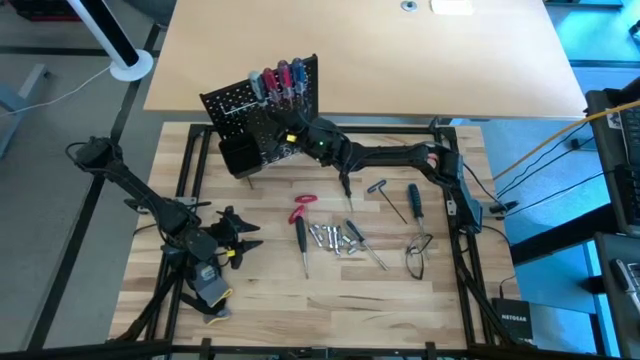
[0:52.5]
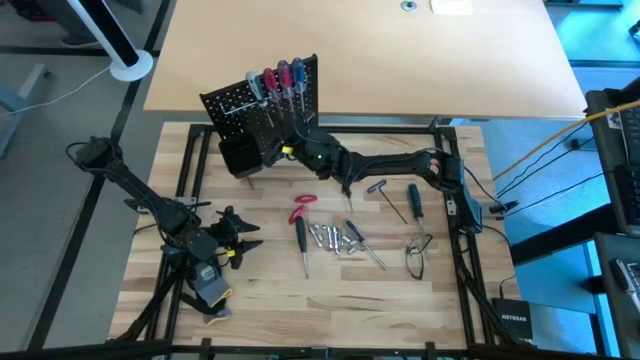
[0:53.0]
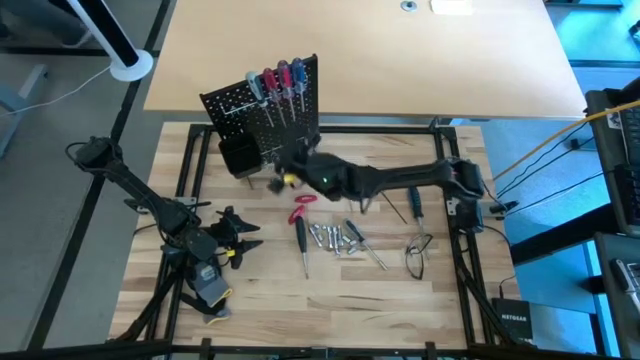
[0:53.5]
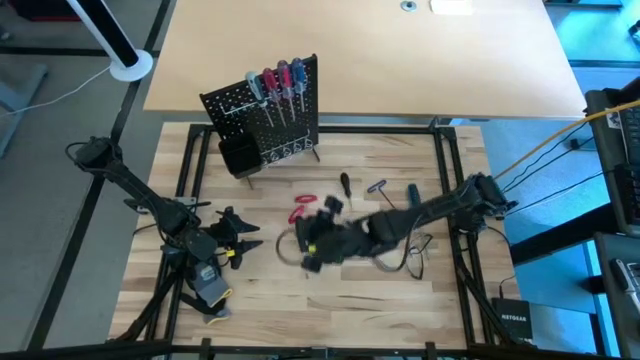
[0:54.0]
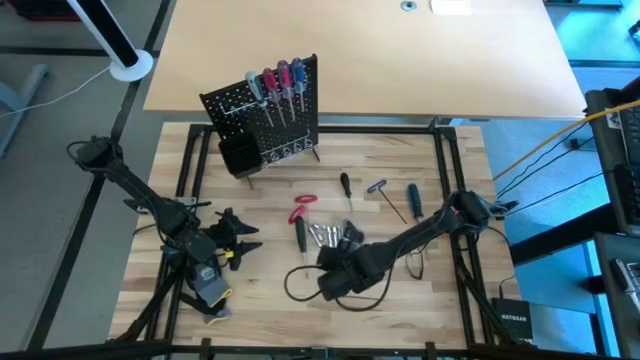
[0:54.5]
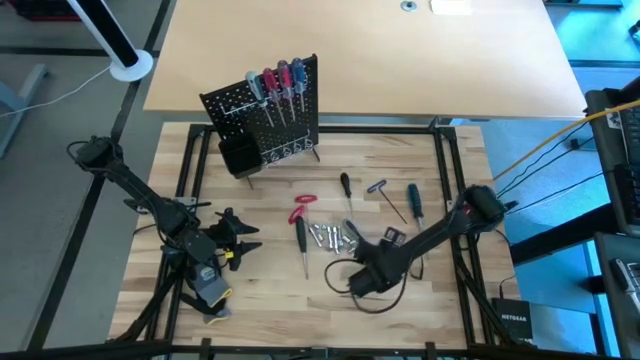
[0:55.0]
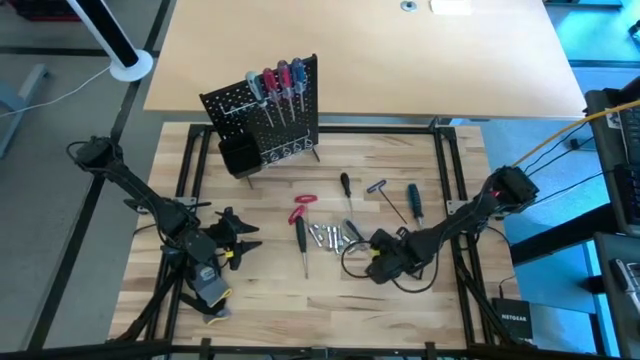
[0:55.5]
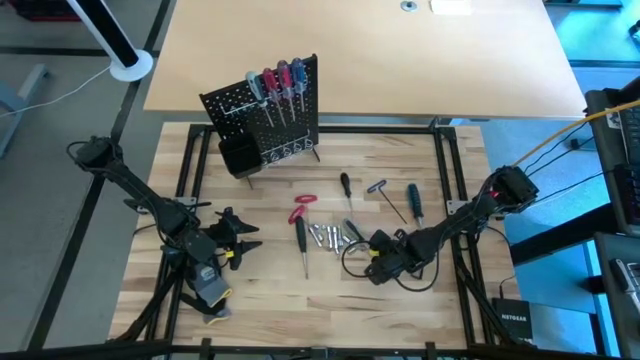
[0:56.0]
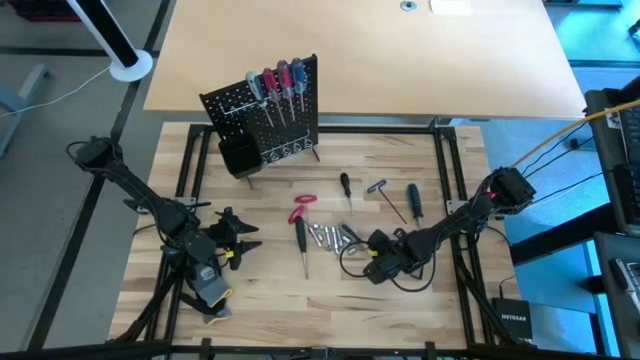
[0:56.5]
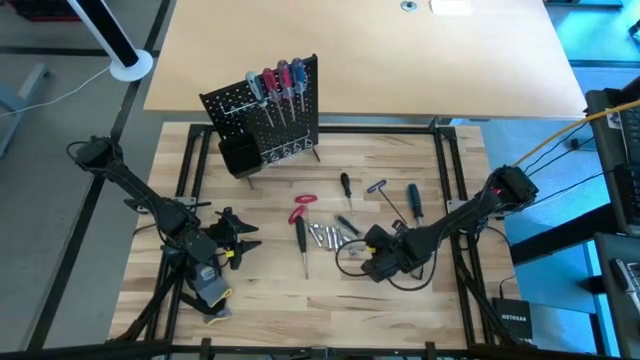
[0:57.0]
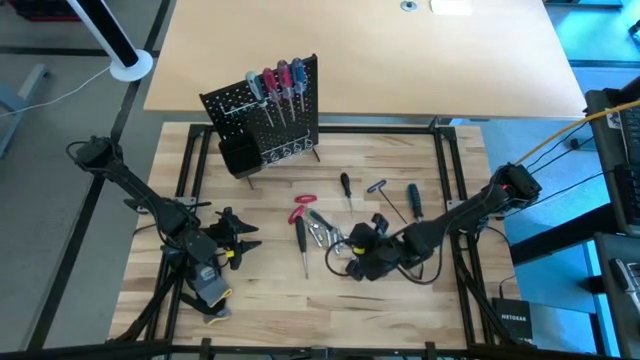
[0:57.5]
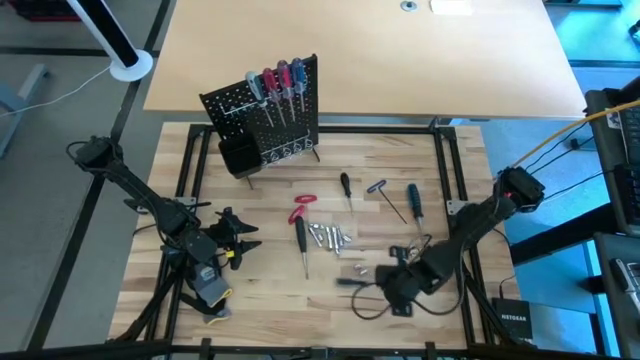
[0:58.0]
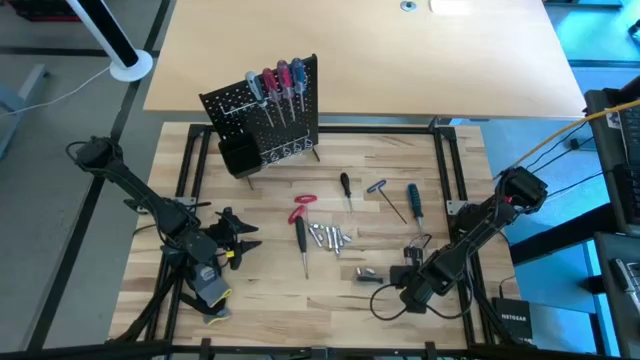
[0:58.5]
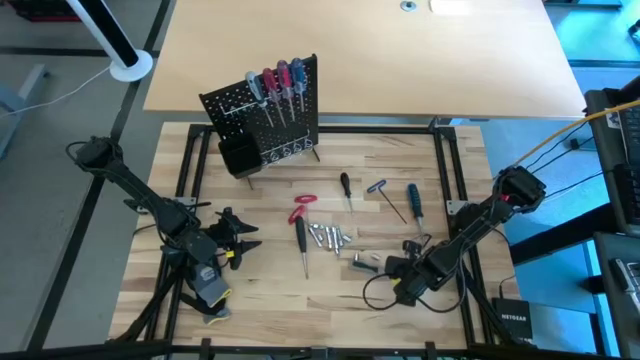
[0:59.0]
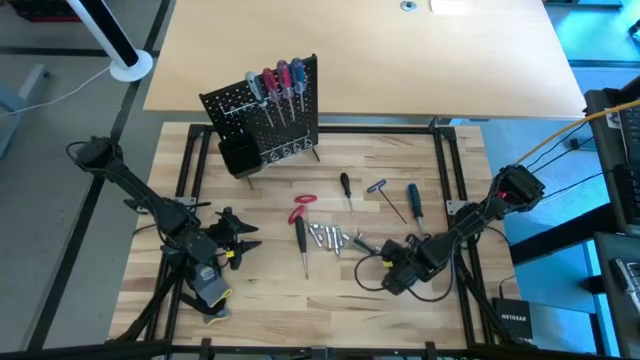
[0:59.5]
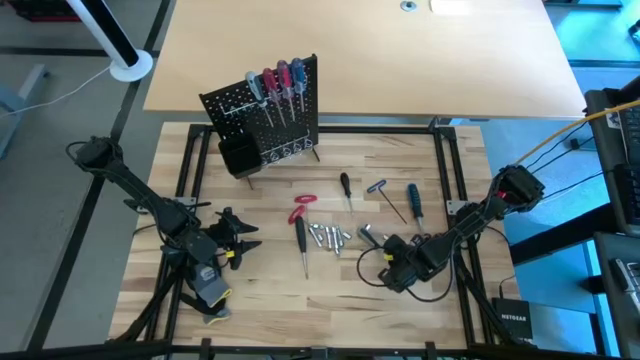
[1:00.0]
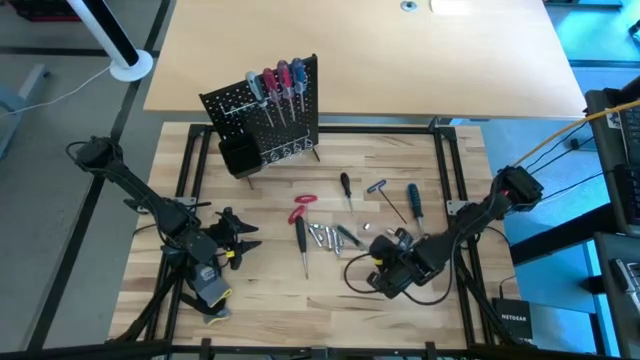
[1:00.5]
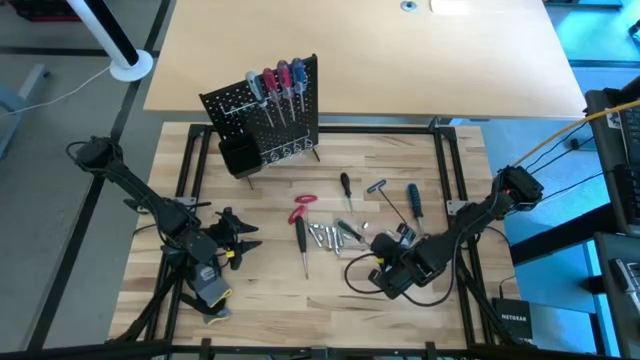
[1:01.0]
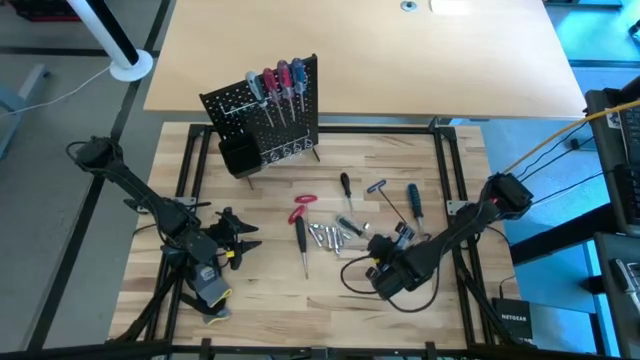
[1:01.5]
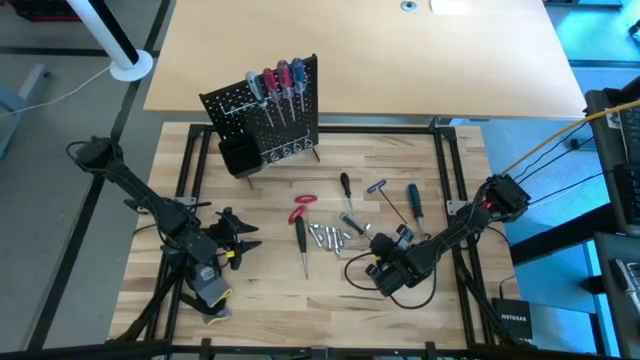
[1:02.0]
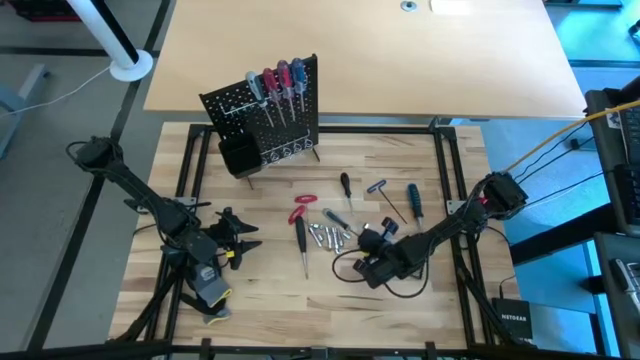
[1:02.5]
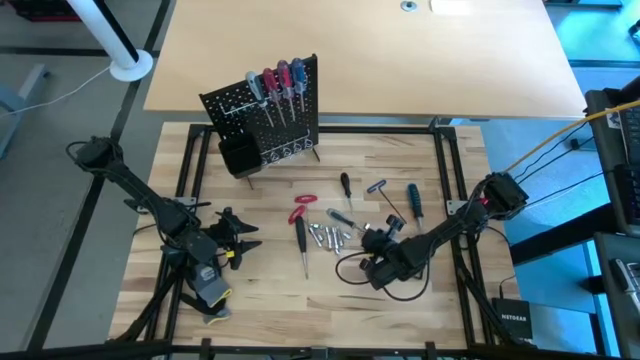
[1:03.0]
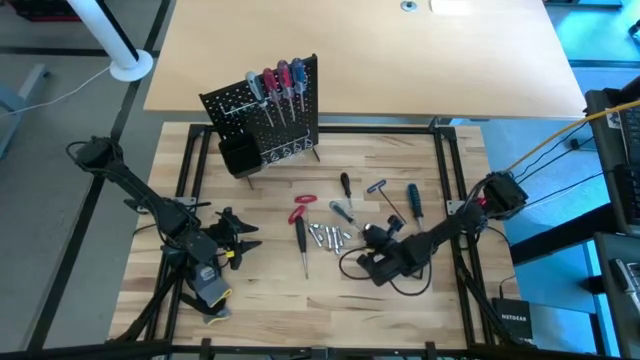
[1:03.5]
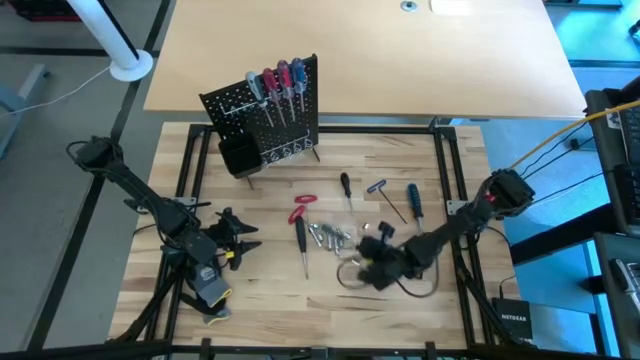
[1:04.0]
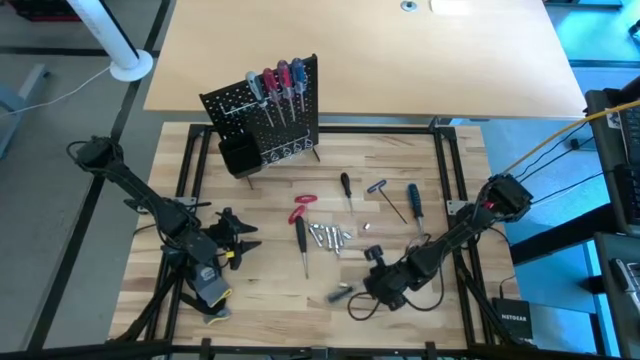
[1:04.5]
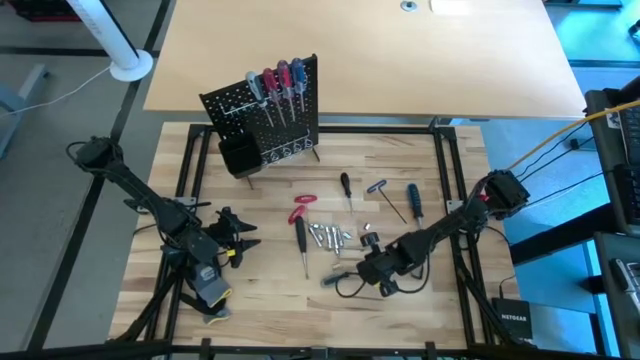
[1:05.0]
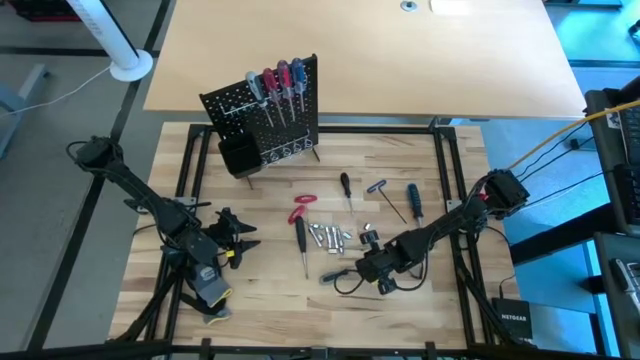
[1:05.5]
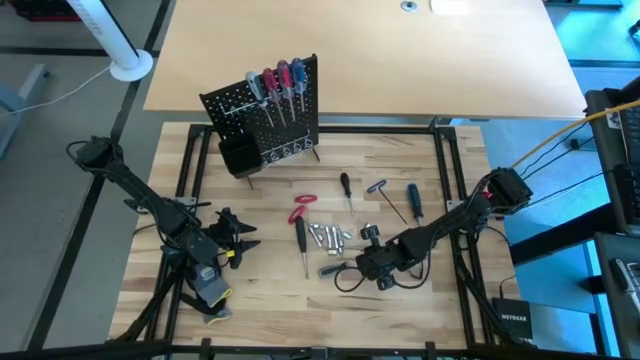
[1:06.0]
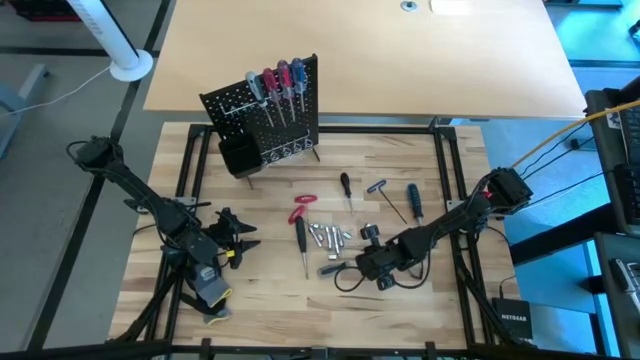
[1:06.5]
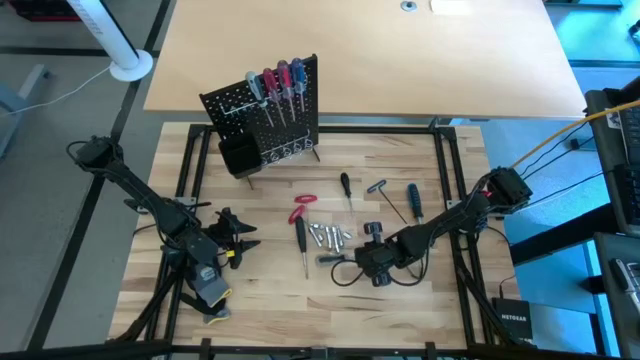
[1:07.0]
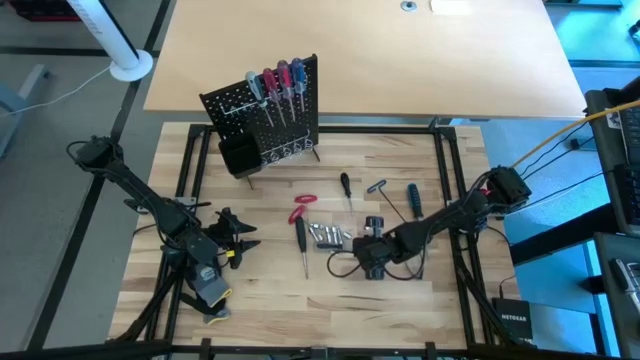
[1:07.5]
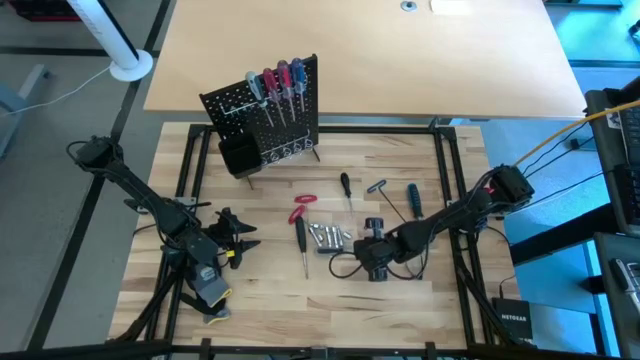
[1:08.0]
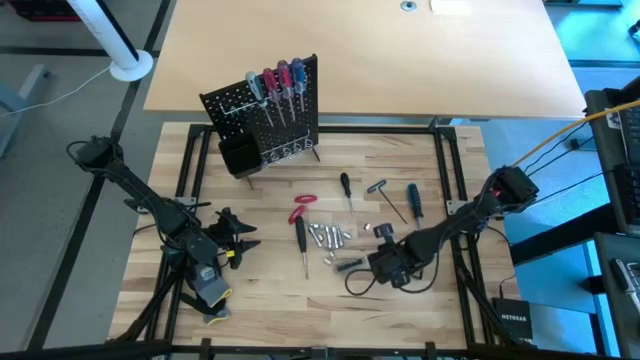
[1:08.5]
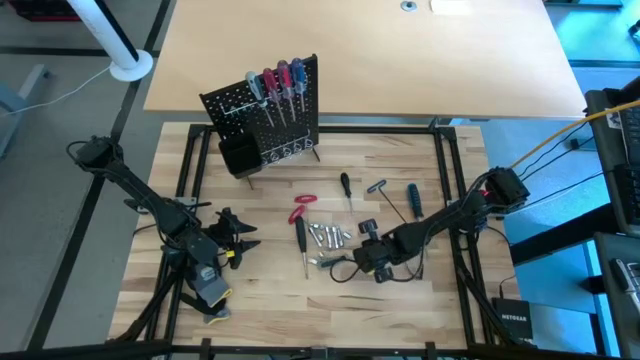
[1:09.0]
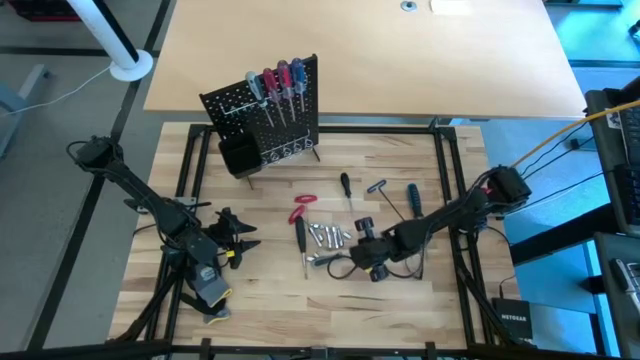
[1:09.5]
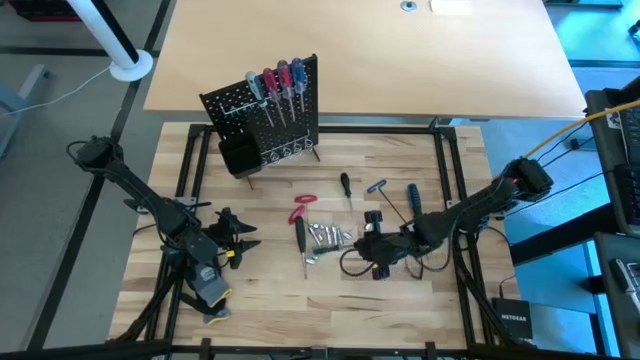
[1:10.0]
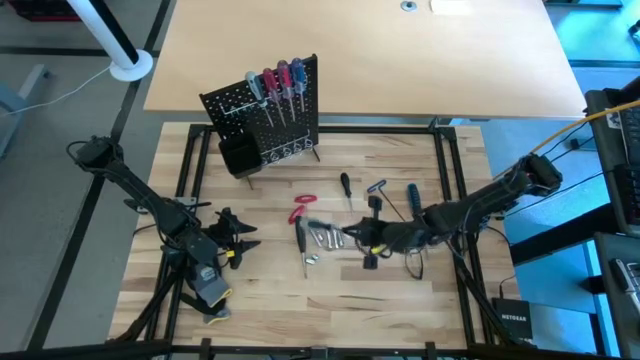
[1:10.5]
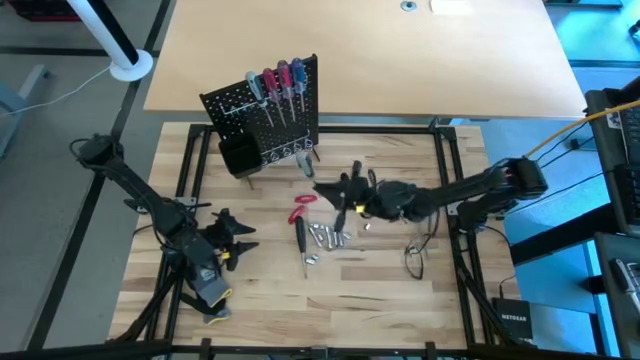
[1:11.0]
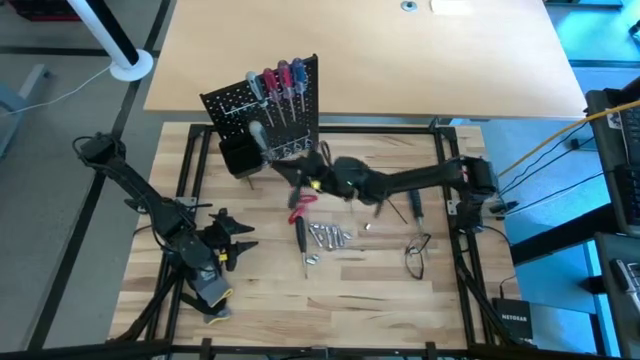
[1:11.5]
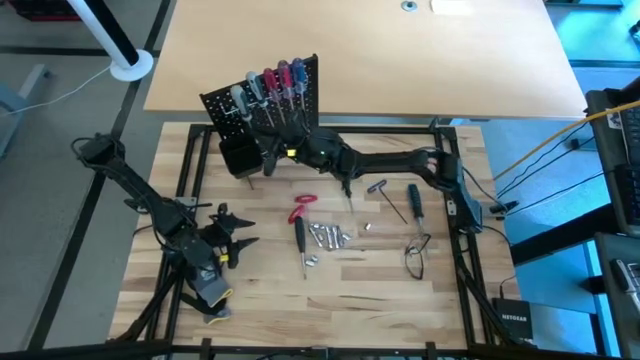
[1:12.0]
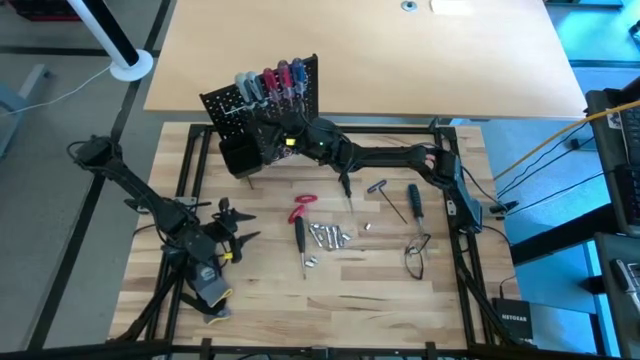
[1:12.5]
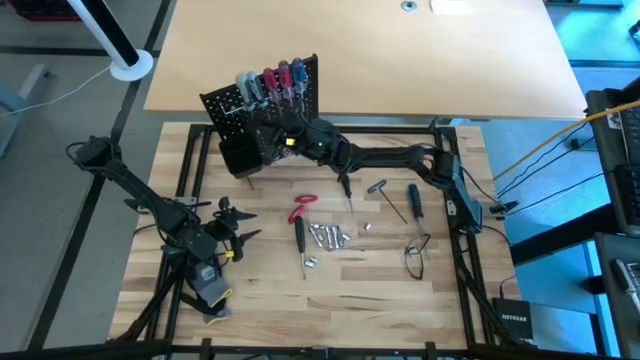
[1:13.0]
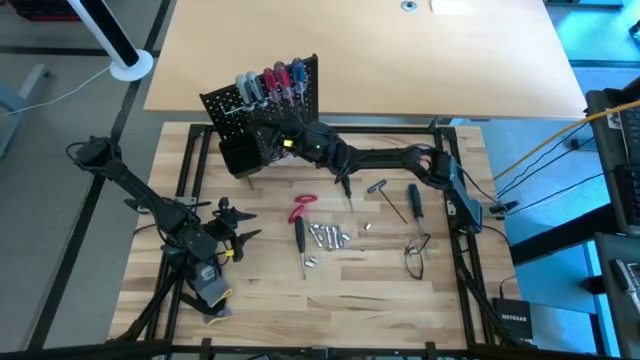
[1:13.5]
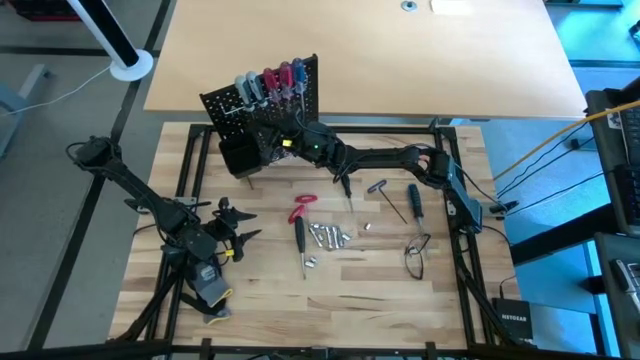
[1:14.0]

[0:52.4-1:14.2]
Task: Hang tools onto peg board
Hang the nut driver onto the peg board
